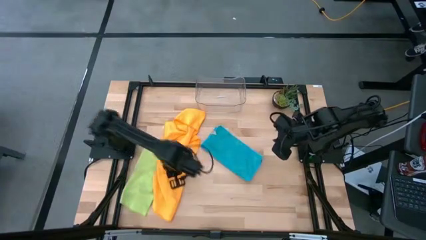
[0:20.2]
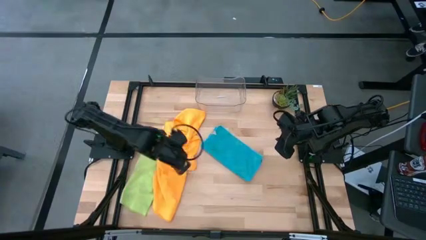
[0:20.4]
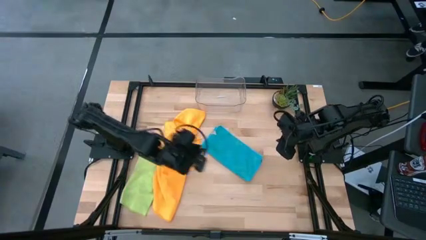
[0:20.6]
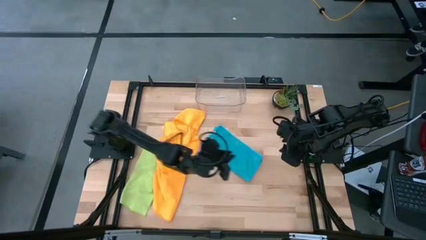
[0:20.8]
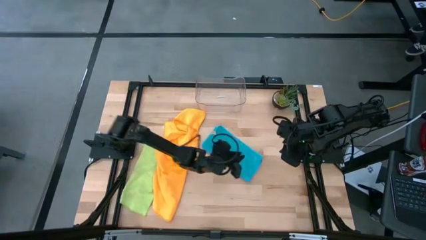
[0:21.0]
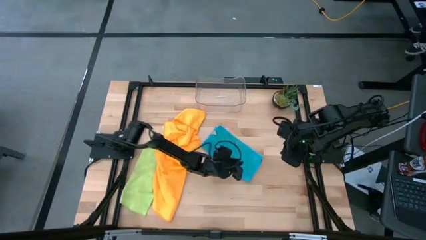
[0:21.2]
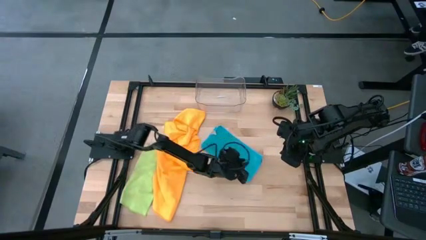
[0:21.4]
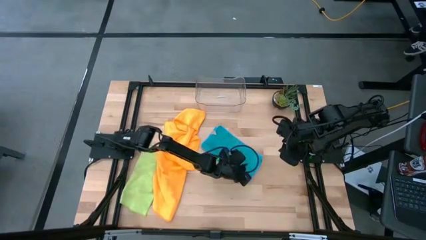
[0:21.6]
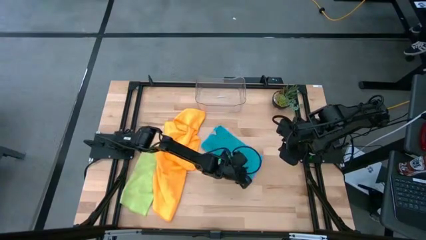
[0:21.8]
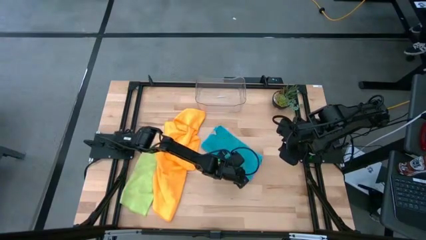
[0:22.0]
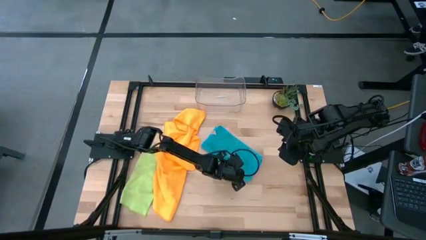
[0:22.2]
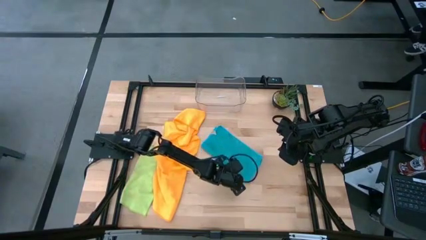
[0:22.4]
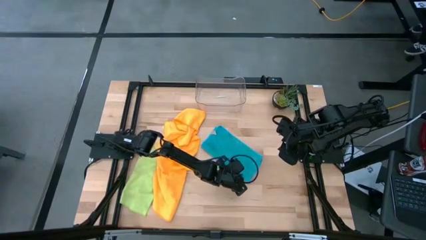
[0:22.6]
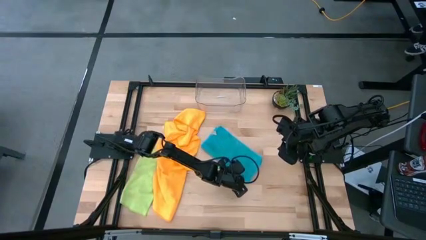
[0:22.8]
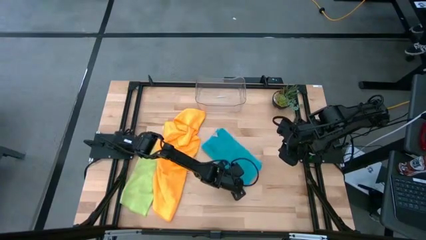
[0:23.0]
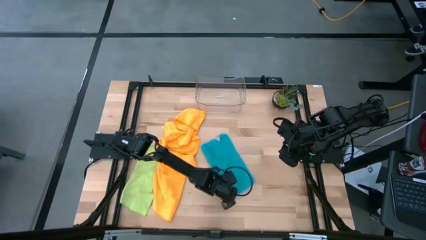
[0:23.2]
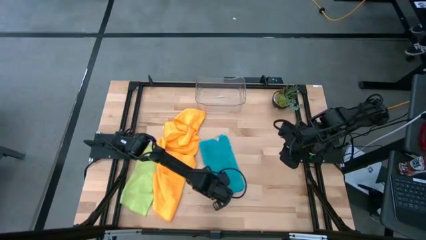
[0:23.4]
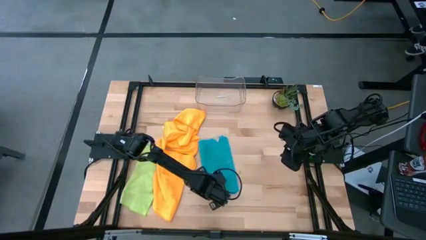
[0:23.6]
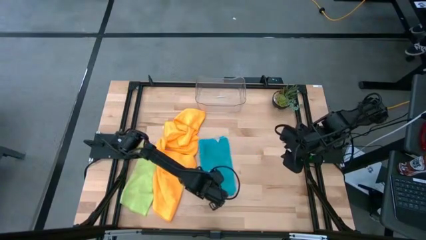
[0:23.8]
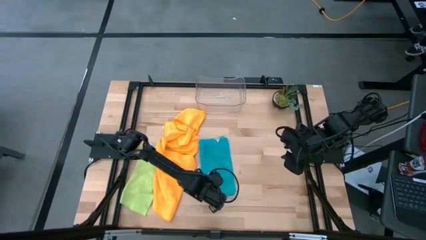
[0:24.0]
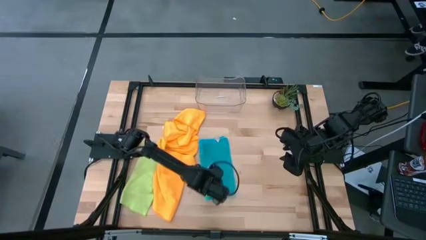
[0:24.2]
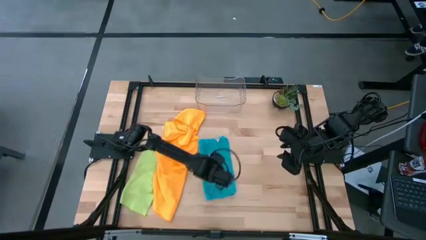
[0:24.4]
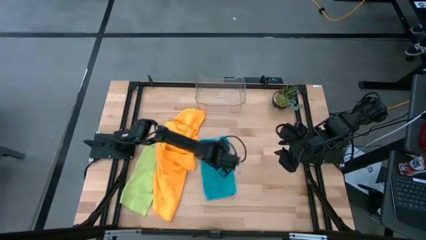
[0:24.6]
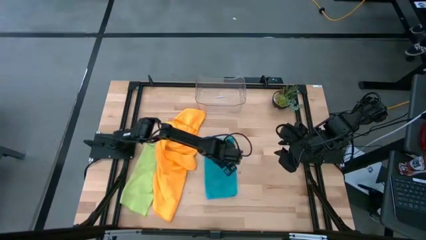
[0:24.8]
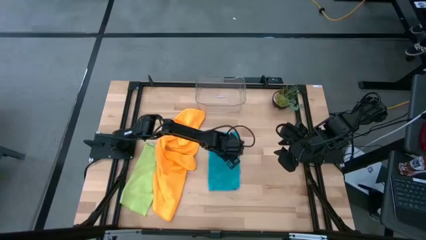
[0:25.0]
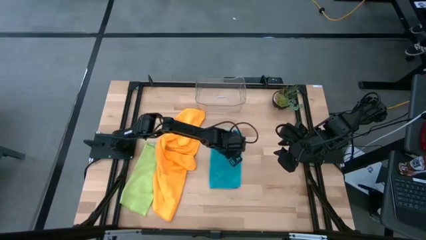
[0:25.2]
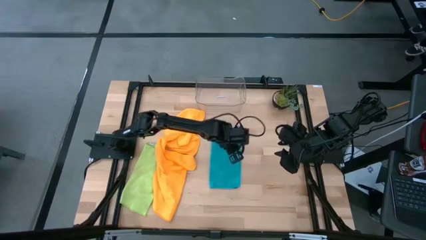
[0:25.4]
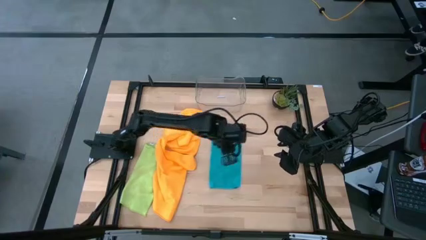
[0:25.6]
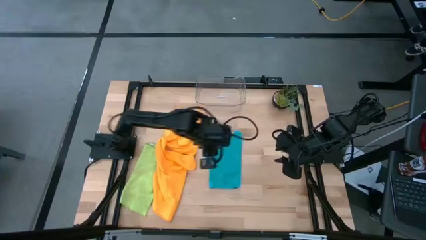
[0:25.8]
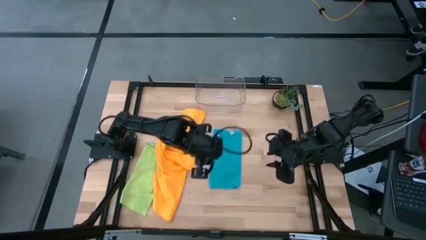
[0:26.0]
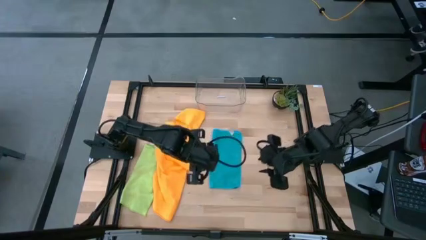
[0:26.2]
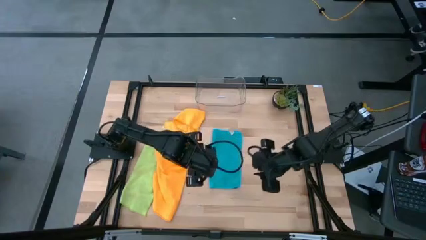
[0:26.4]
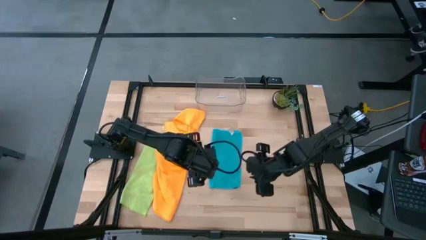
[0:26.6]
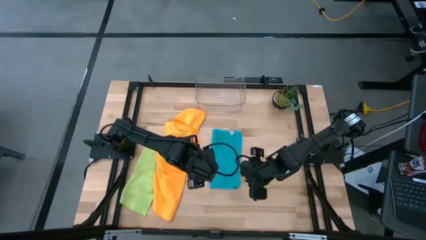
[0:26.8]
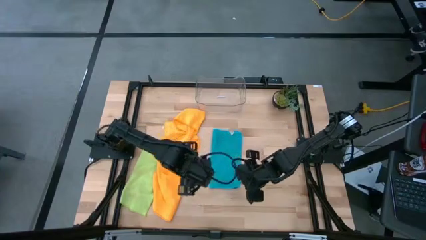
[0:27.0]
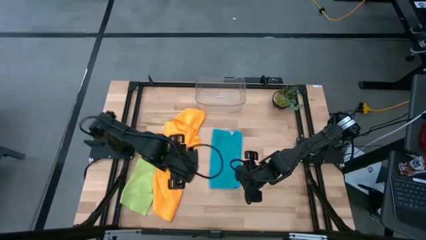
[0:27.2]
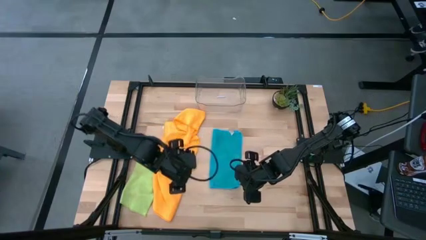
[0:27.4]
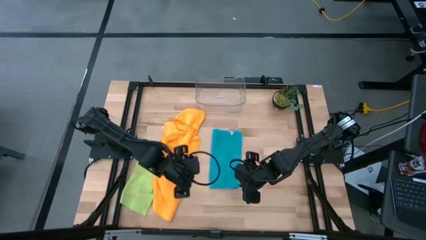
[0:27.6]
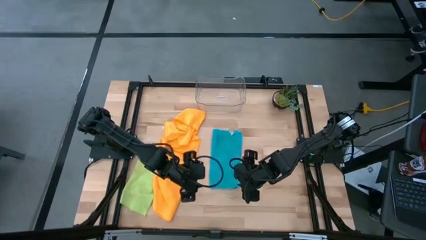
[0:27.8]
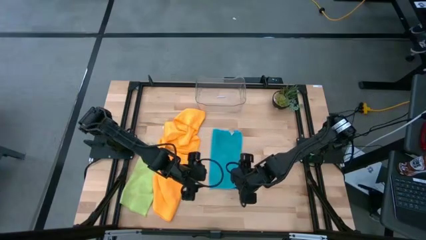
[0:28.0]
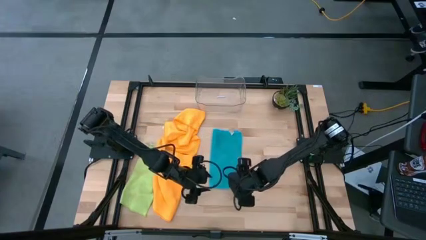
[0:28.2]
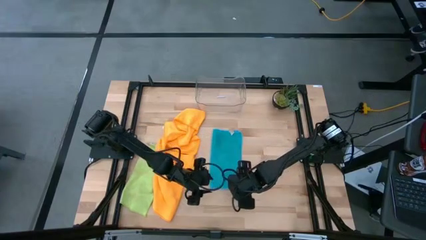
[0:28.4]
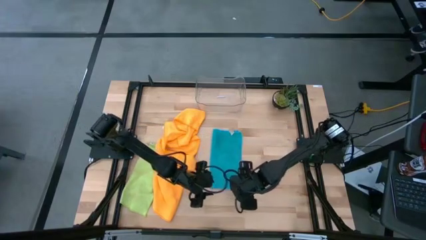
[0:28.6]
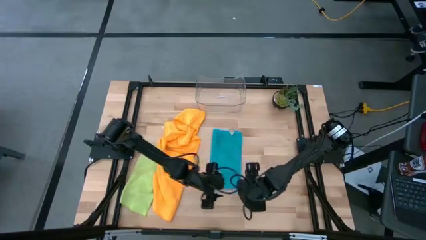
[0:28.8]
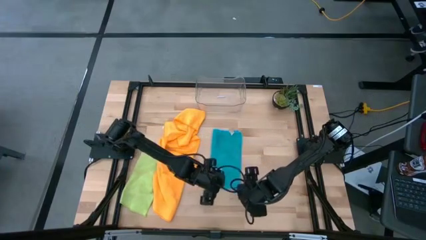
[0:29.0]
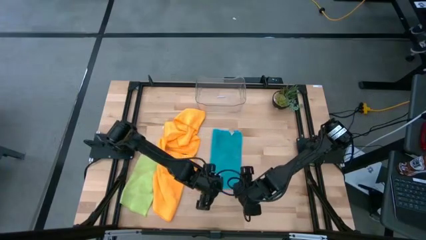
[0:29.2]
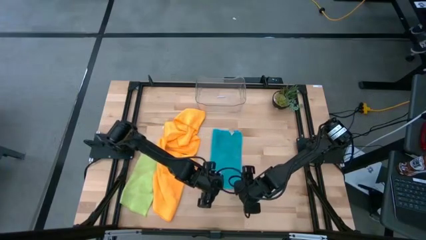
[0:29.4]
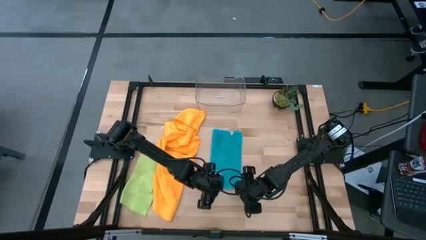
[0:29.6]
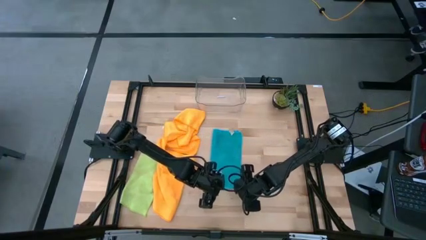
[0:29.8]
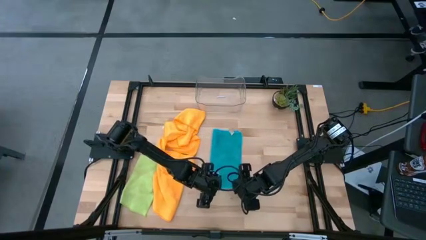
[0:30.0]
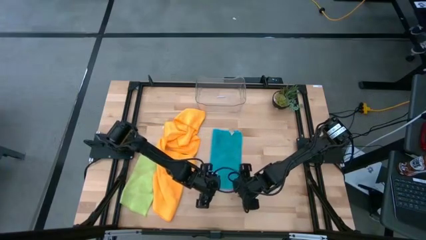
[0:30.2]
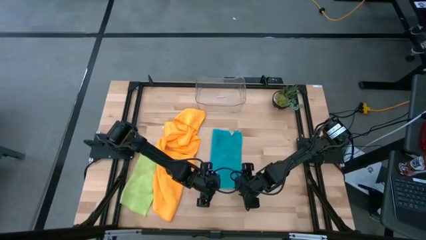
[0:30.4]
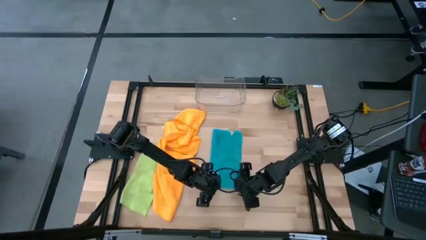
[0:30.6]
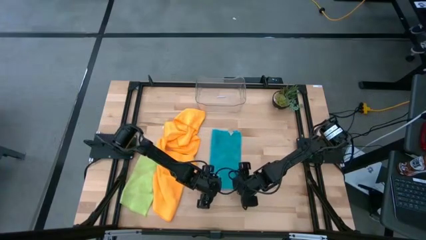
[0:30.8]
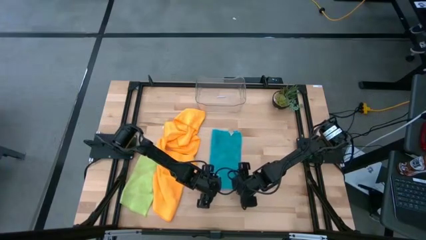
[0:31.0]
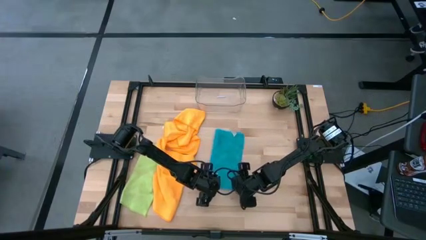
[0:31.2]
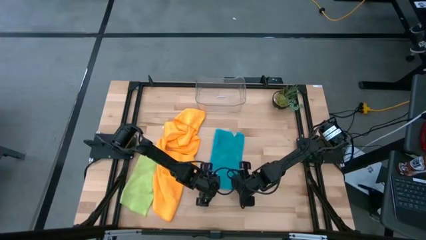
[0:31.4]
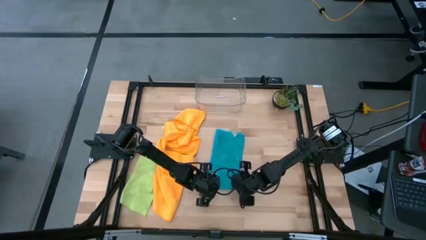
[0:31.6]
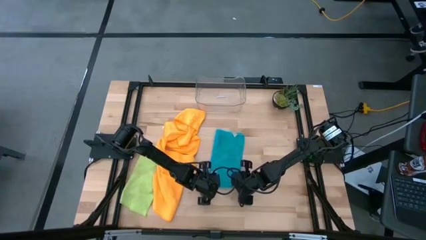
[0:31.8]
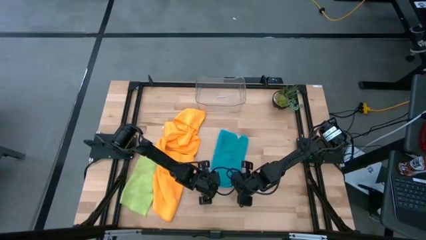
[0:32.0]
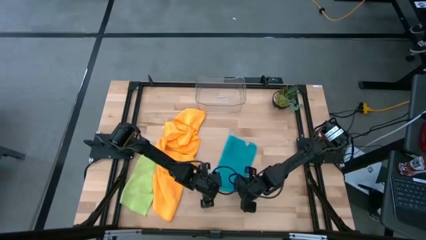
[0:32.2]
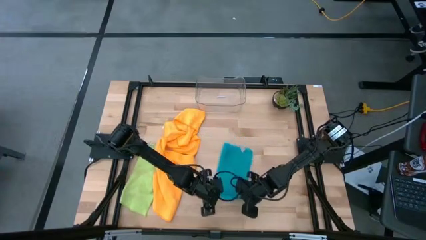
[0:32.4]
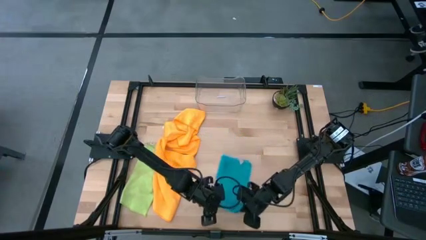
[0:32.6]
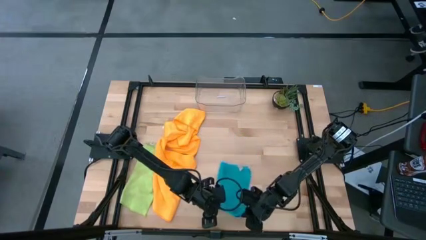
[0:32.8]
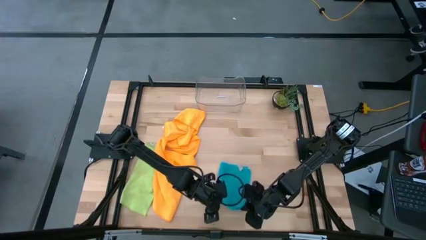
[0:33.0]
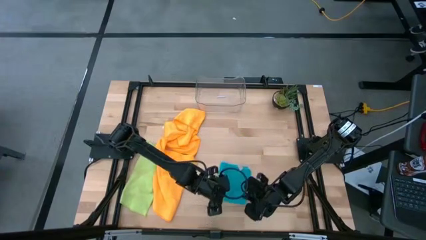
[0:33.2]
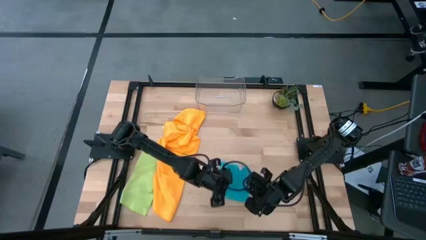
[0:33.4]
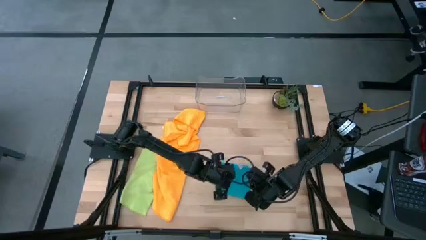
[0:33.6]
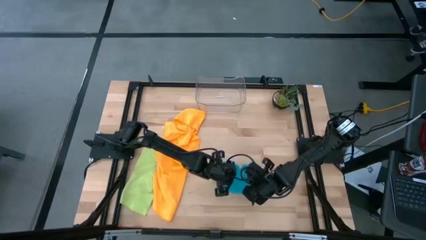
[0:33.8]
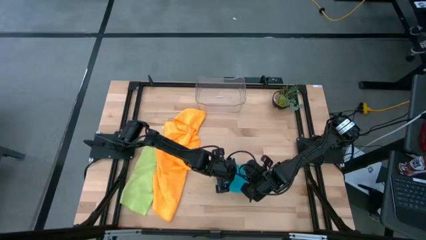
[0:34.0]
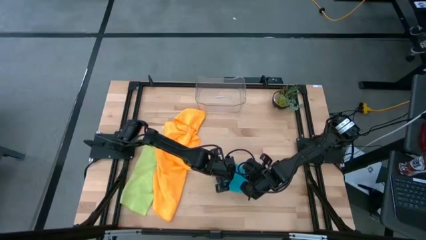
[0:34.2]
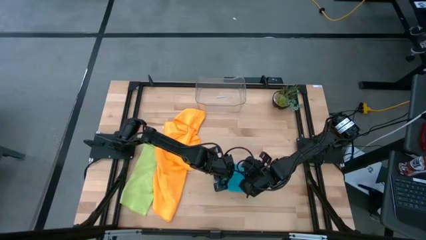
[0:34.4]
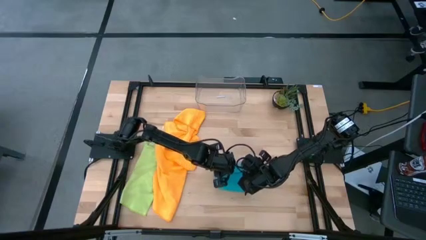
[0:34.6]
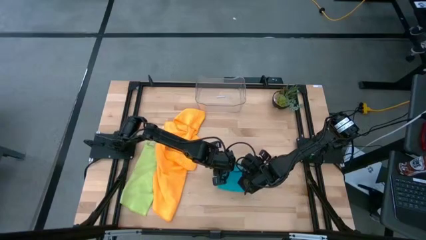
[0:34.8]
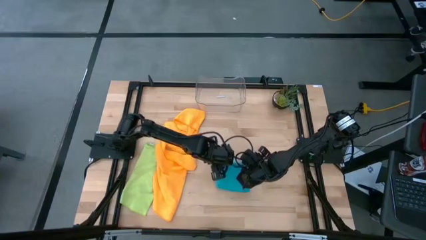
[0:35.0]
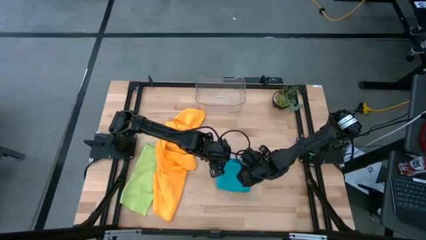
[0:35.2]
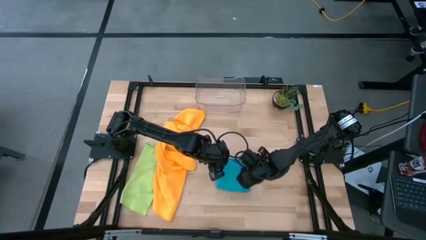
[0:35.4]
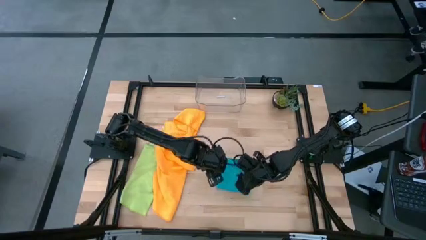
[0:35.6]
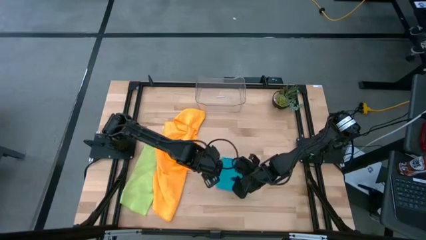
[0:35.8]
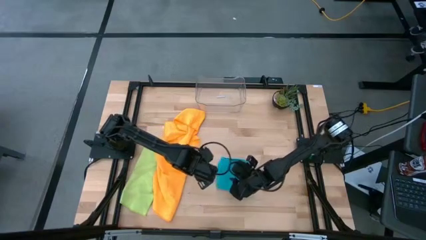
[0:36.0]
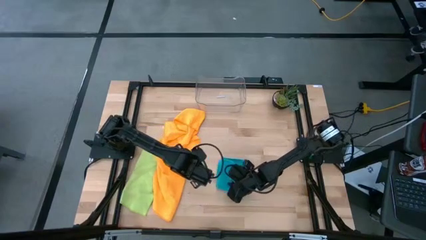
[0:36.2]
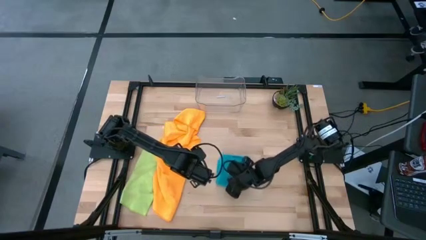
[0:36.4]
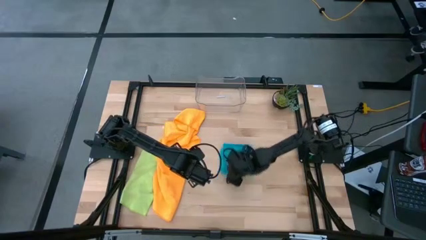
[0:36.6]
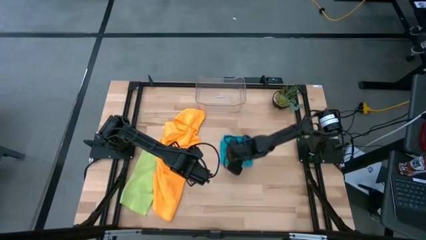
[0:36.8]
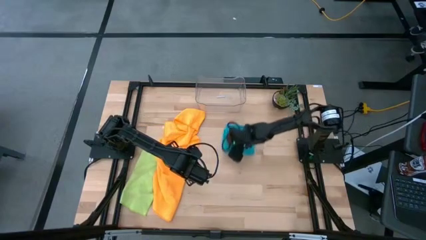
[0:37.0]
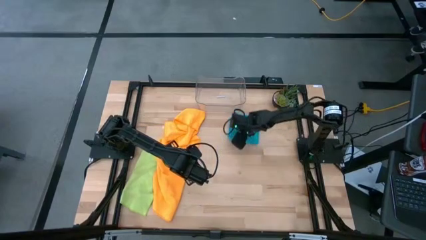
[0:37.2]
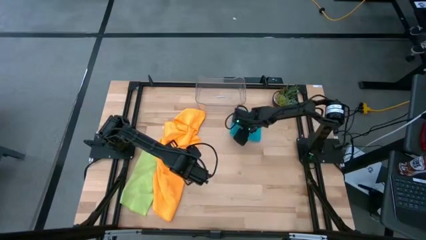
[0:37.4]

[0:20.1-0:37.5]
Task: Fold microfiber towels
Fold the blue microfiber cloth
